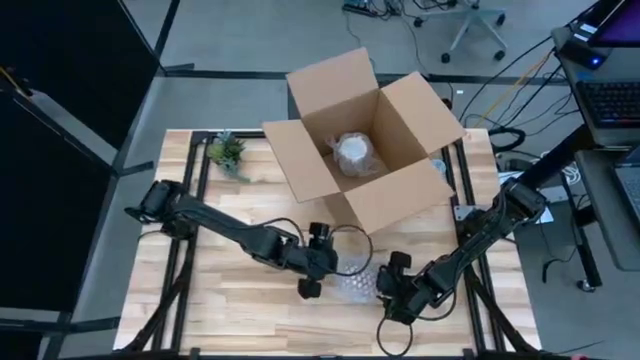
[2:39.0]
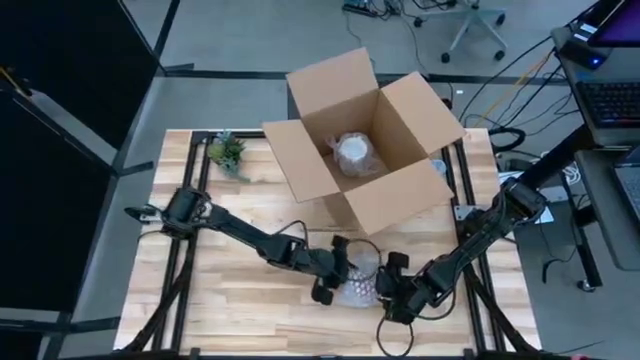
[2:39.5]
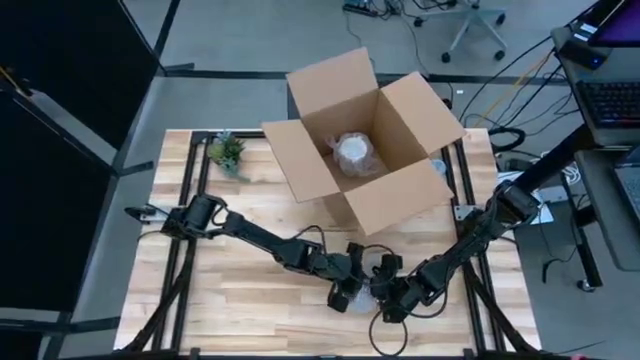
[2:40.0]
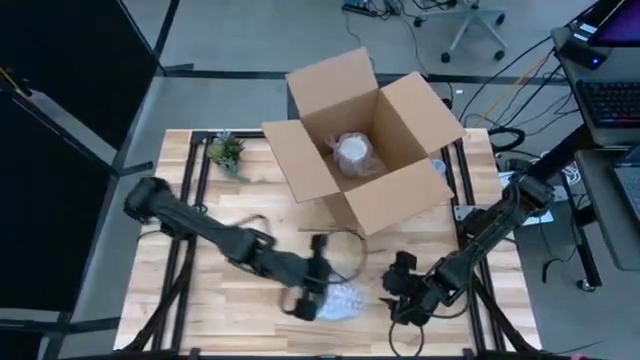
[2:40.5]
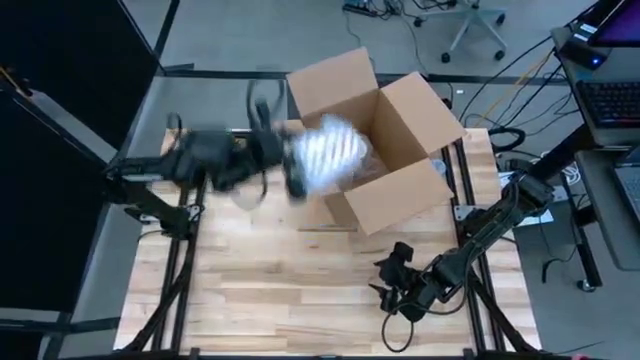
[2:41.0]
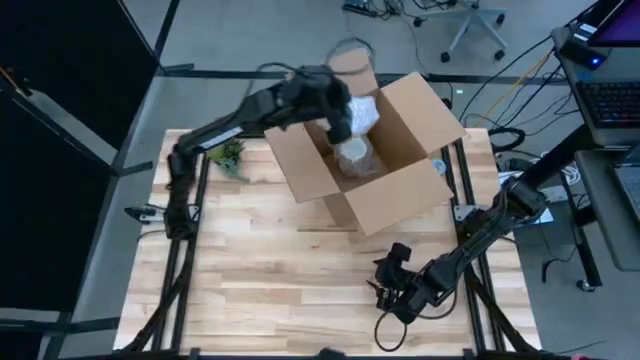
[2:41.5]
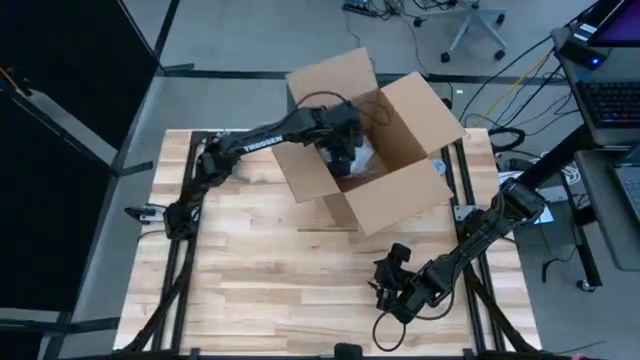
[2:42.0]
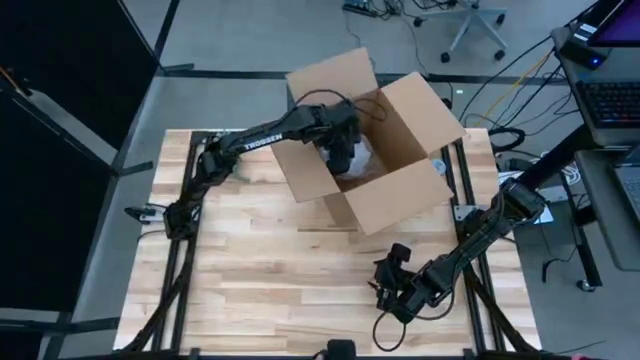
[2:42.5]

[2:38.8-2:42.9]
Task: wrap mug
Put the red mug into the box

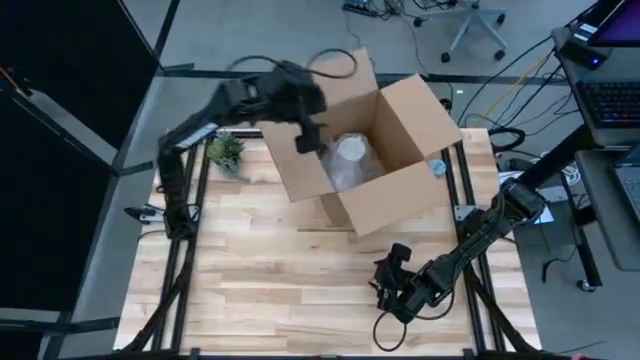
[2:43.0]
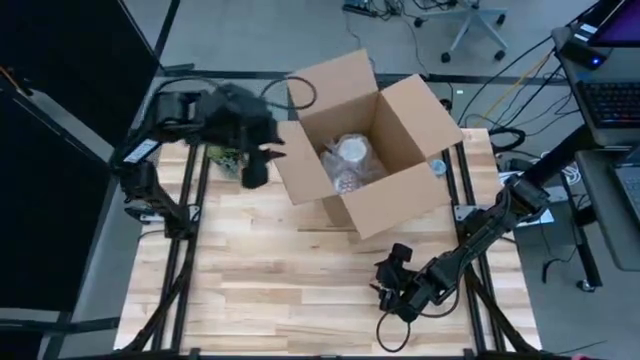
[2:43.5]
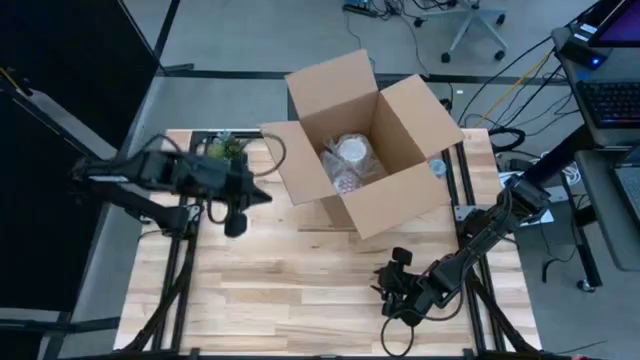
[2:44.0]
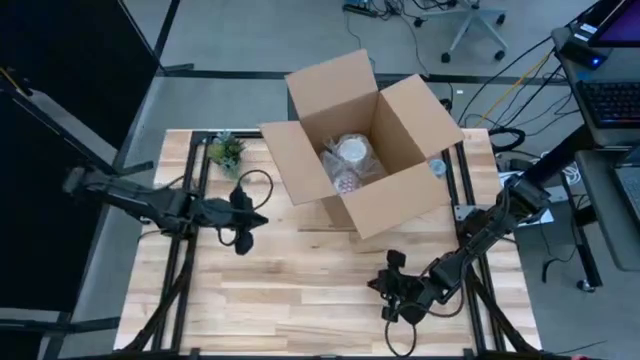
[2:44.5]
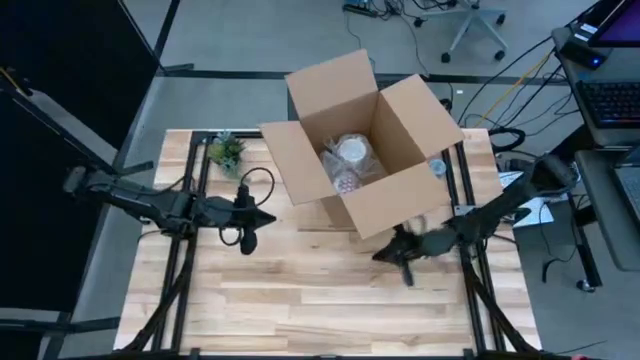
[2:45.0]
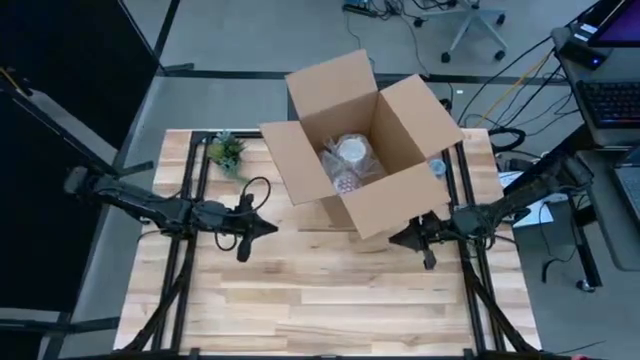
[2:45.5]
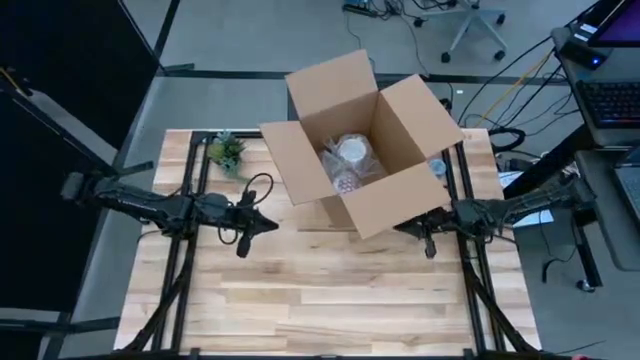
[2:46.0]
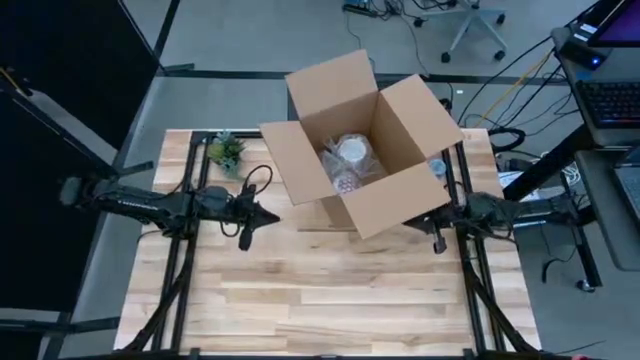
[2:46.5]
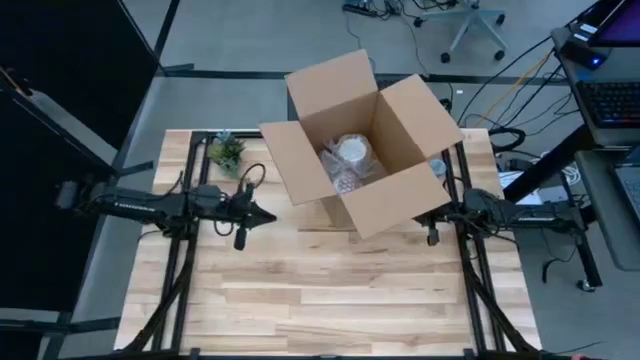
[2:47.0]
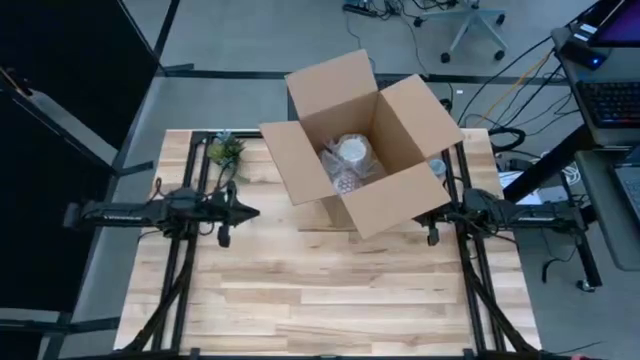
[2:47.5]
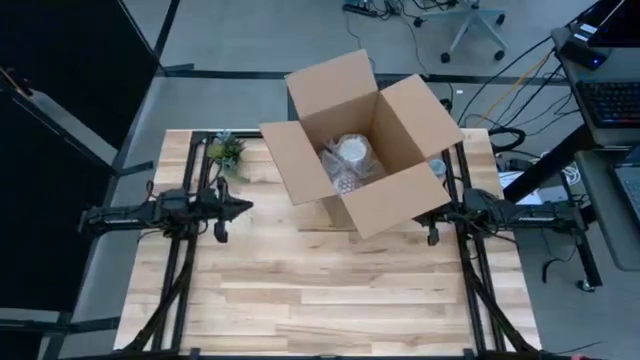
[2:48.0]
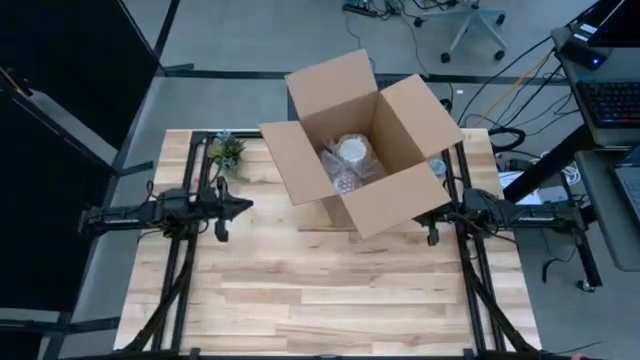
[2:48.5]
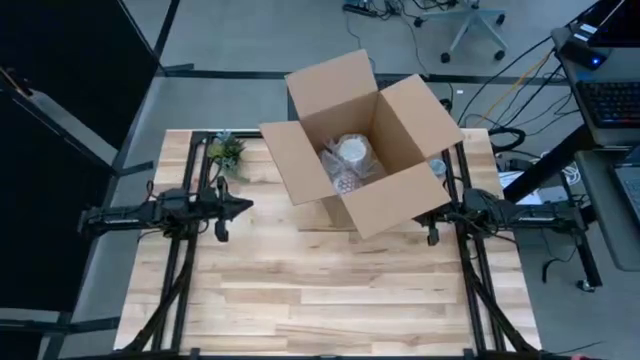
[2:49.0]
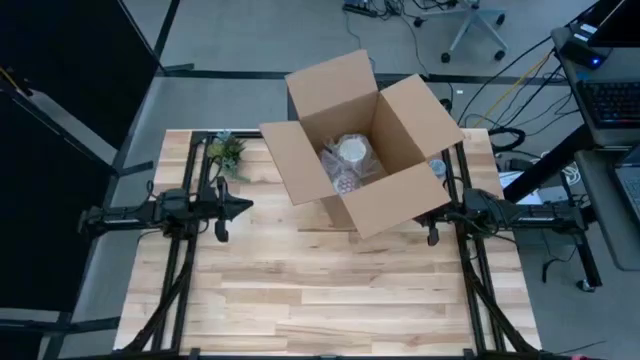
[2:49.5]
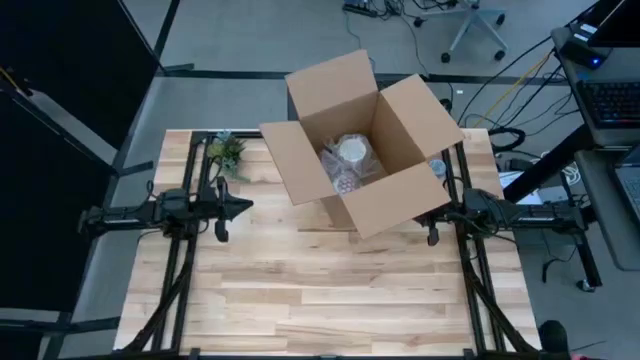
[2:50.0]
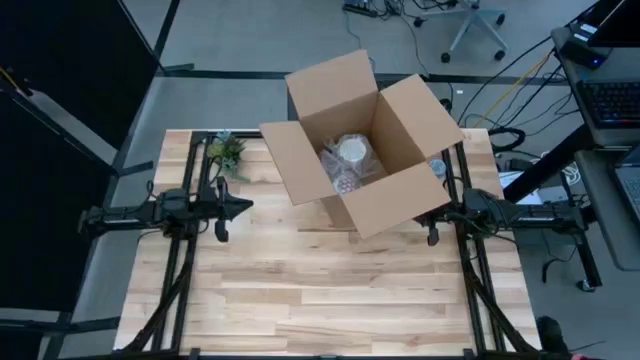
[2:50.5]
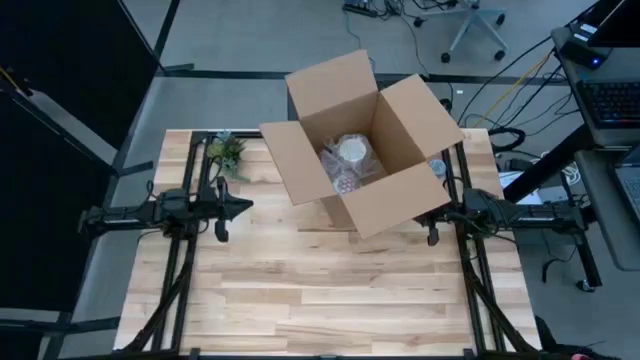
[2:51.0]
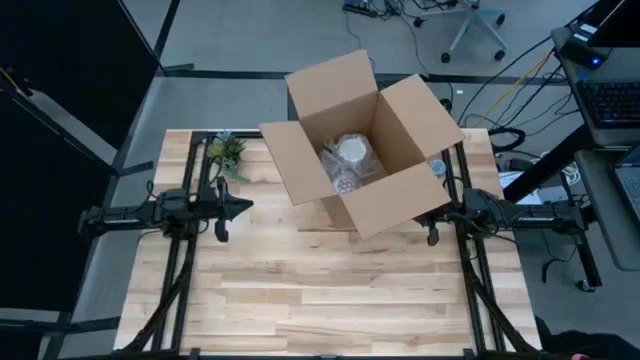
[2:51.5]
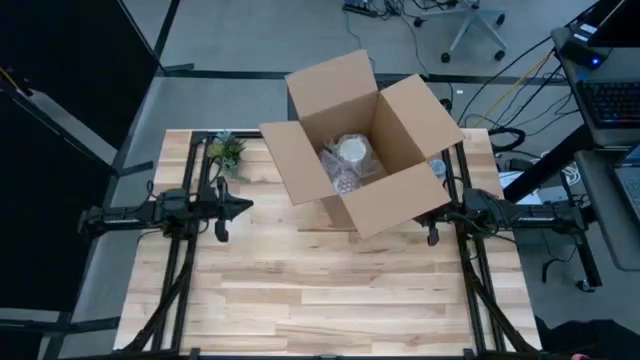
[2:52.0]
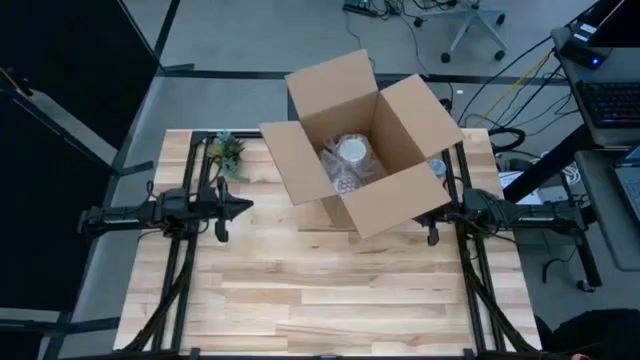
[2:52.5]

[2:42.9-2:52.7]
Return to Home Position

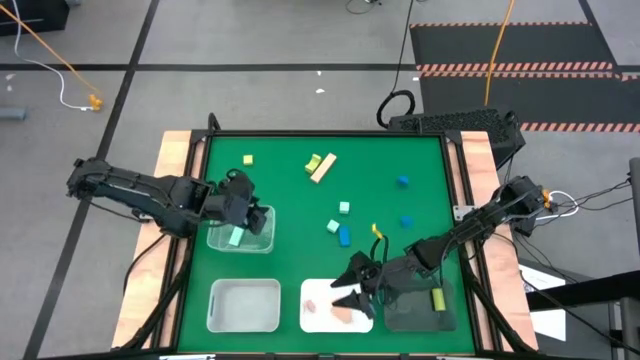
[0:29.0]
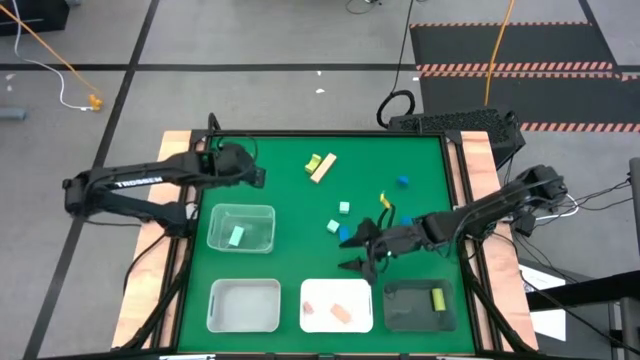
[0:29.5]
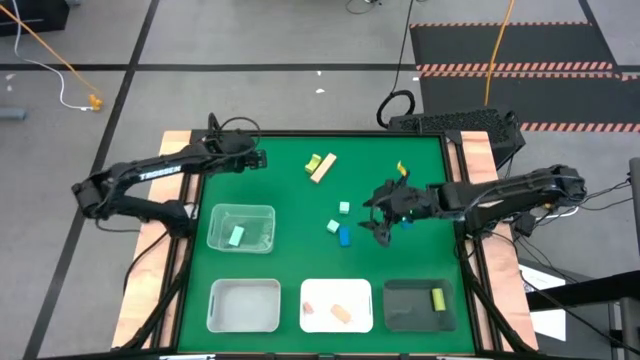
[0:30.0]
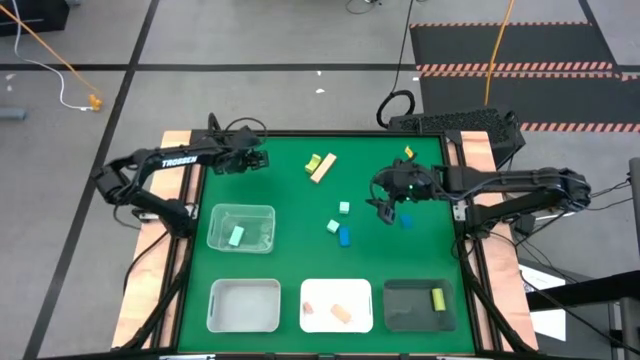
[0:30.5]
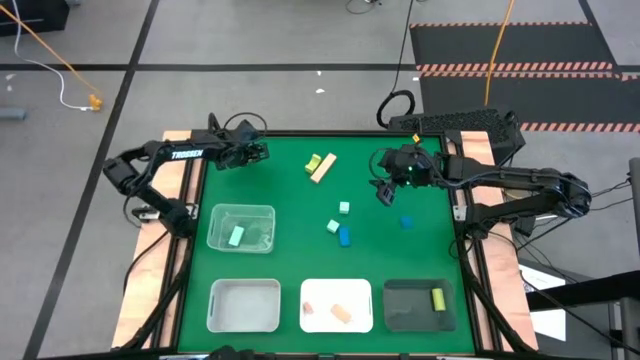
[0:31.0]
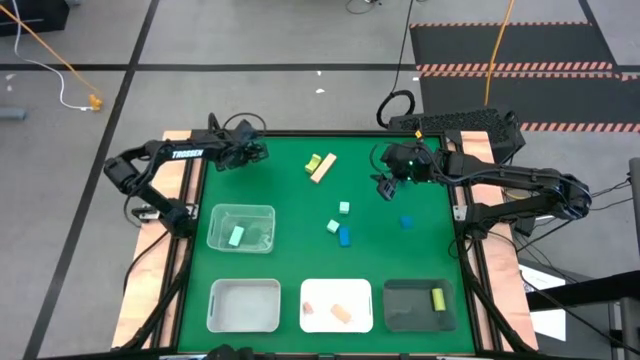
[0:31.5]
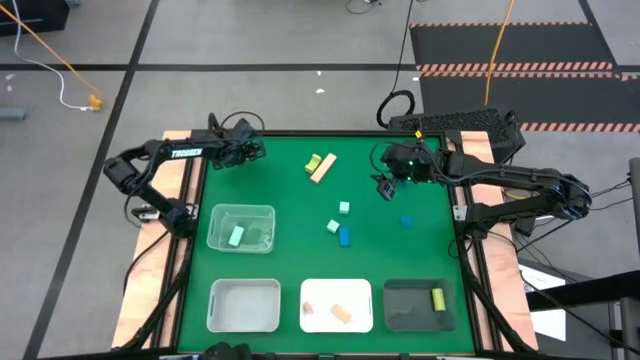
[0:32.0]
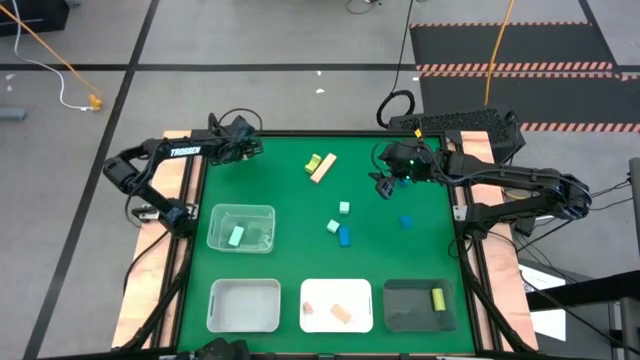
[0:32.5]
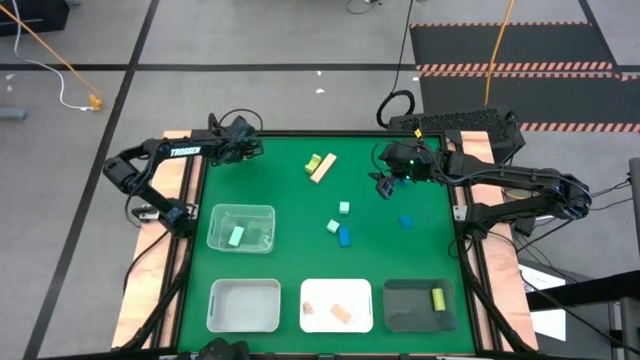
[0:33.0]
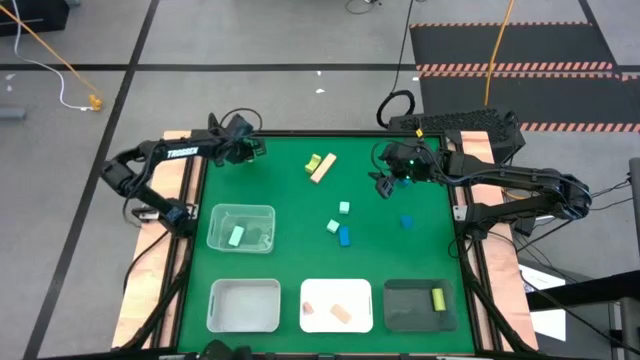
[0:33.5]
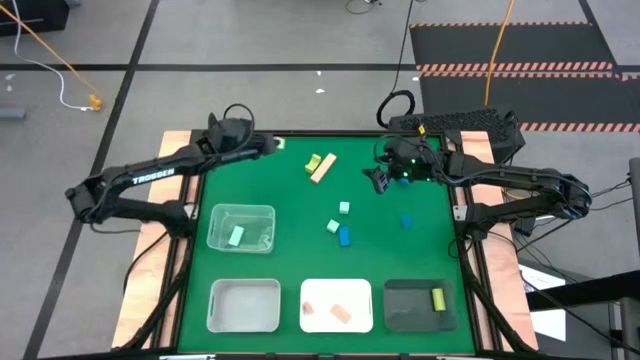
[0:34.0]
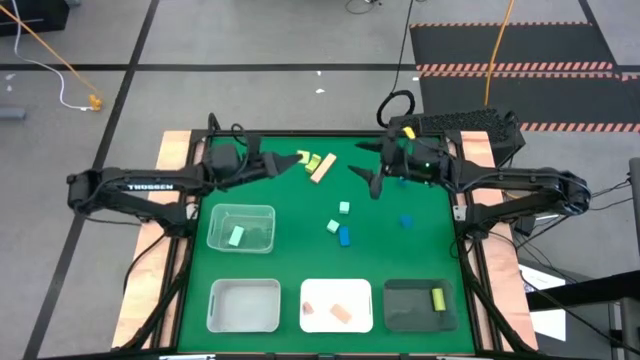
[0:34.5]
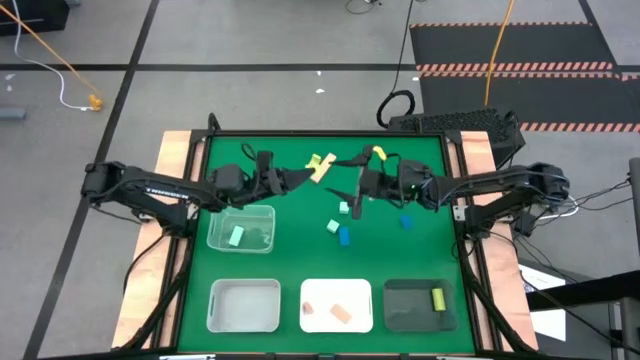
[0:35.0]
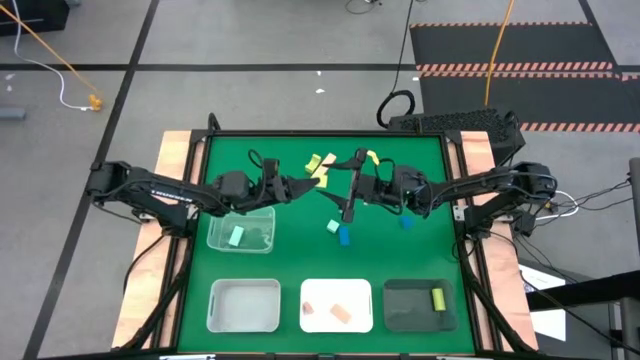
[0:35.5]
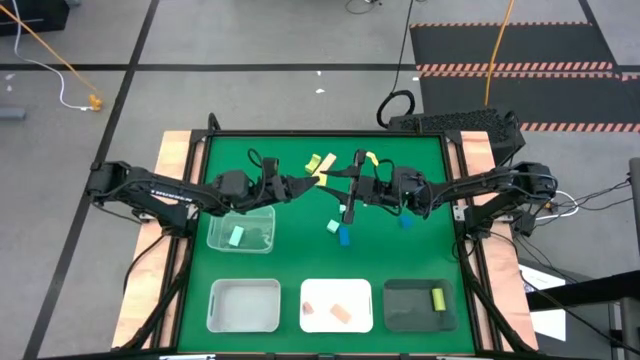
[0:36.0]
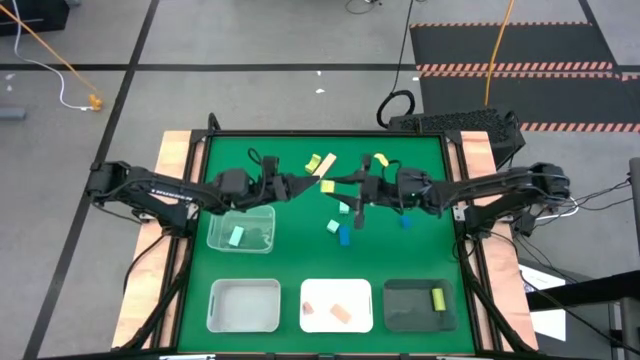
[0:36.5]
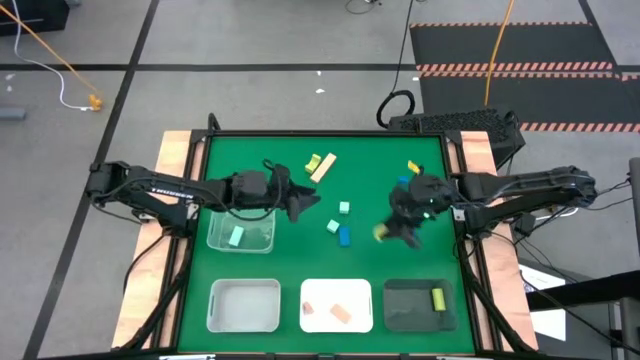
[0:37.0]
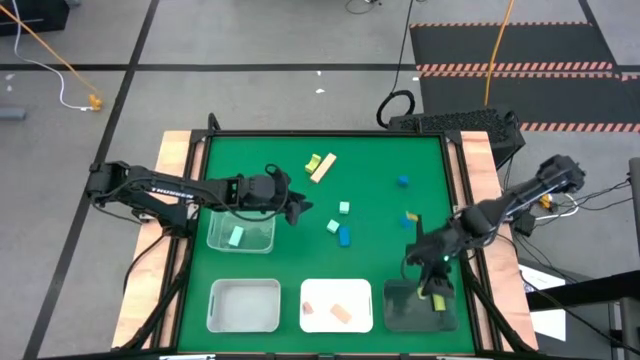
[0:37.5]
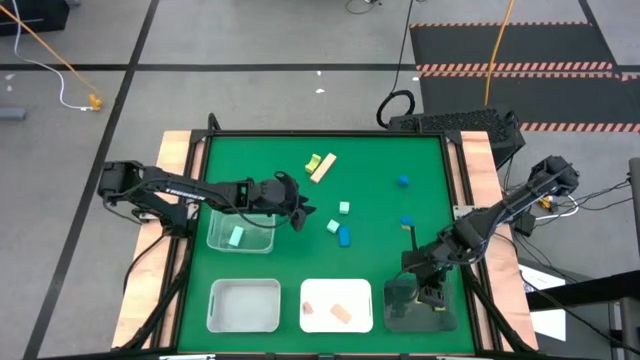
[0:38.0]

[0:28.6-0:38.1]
Task: Sort & place blocks by color
Put the left green block into the black bin
